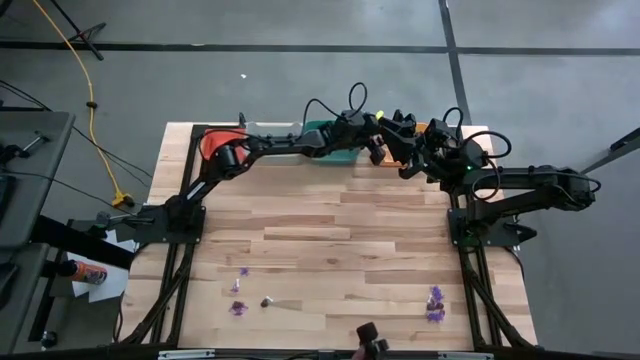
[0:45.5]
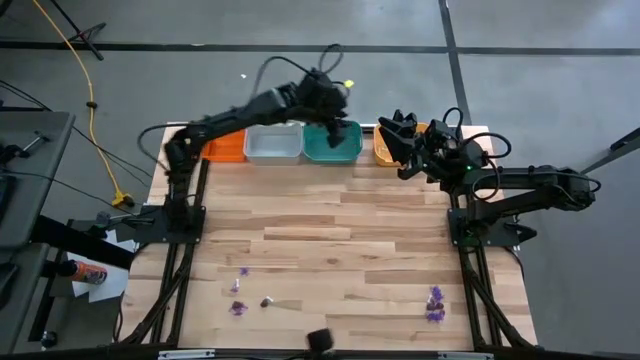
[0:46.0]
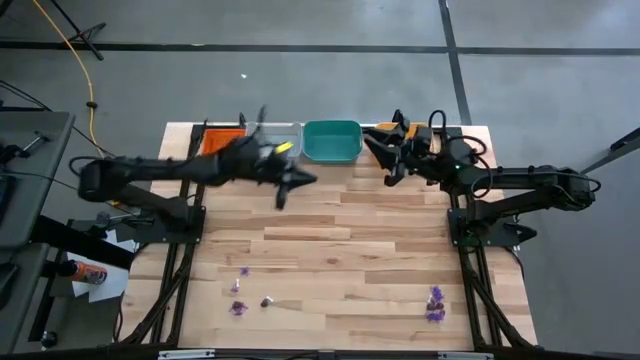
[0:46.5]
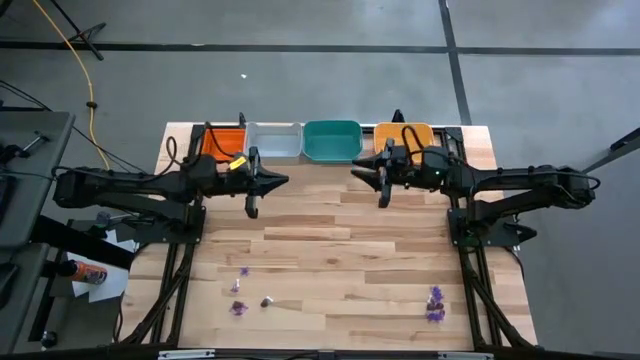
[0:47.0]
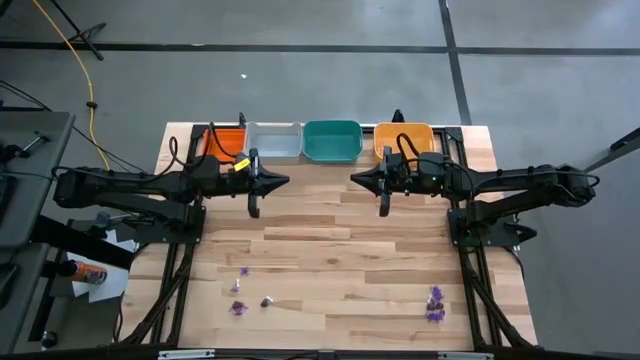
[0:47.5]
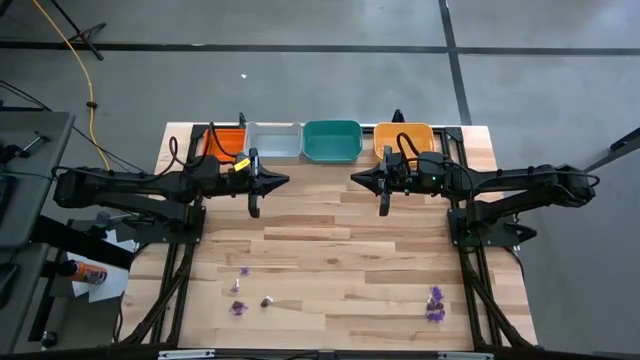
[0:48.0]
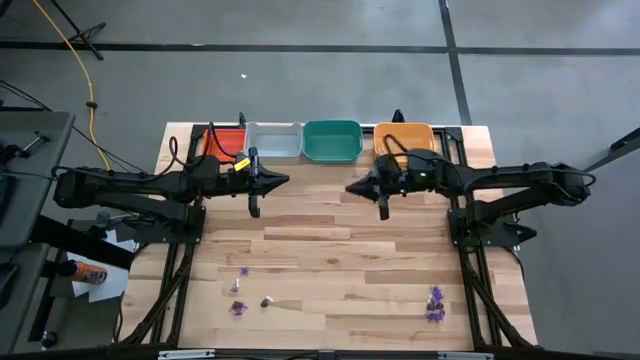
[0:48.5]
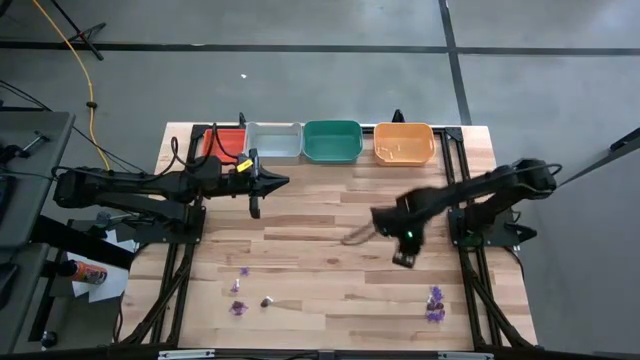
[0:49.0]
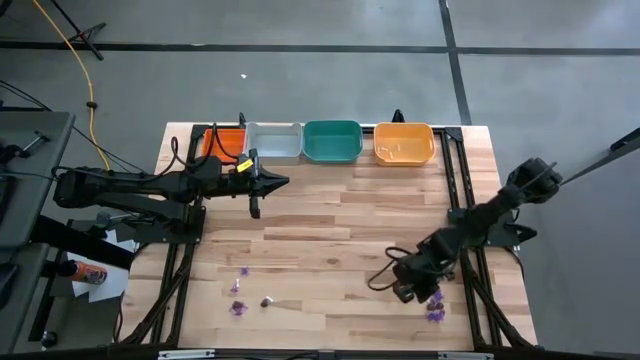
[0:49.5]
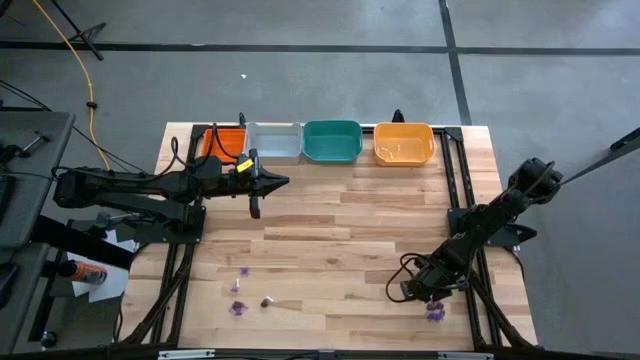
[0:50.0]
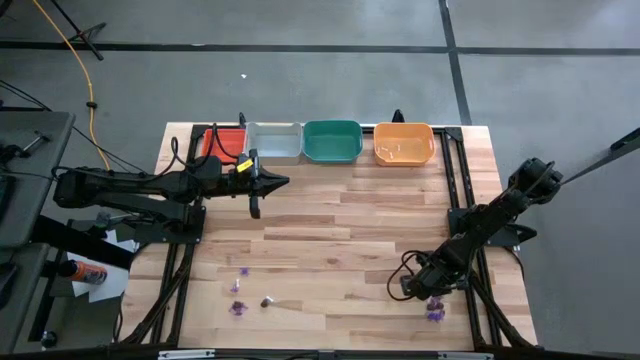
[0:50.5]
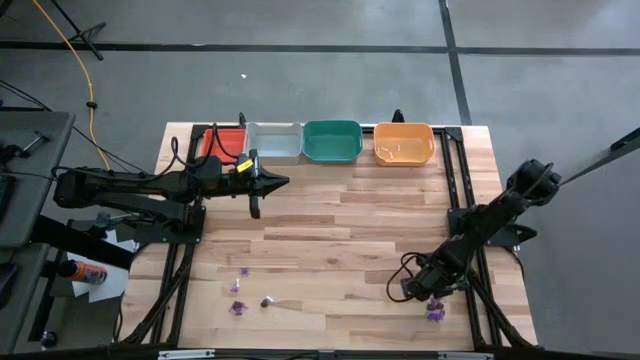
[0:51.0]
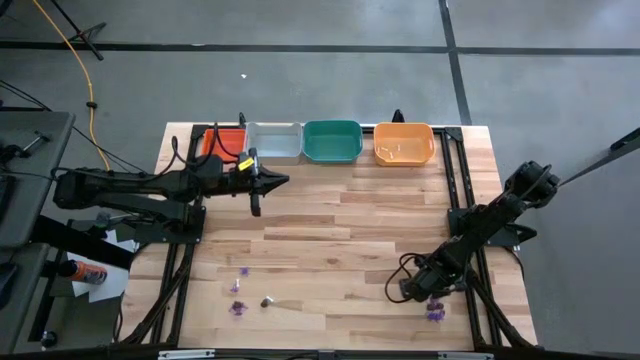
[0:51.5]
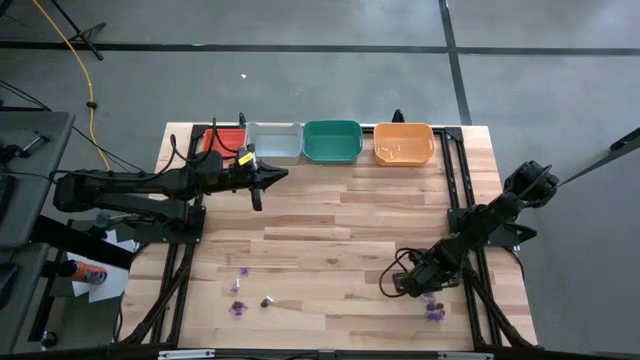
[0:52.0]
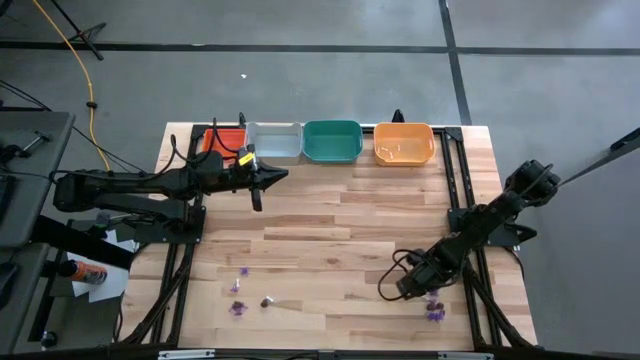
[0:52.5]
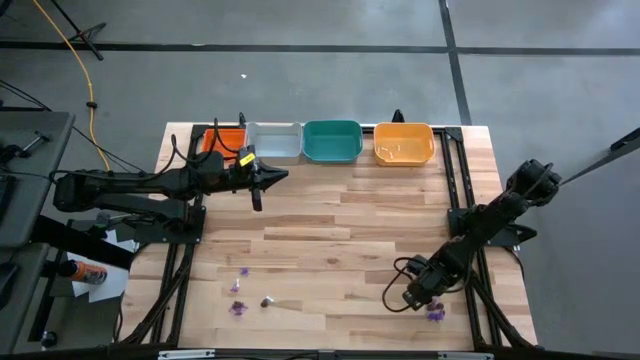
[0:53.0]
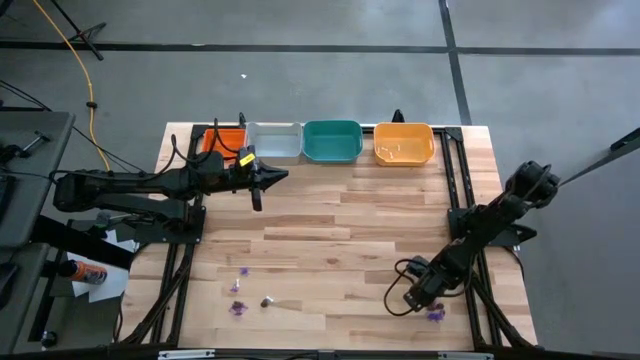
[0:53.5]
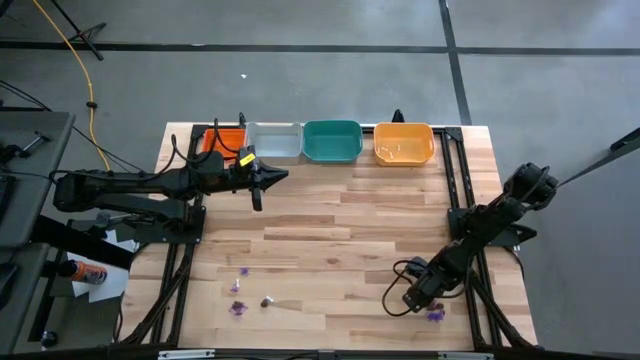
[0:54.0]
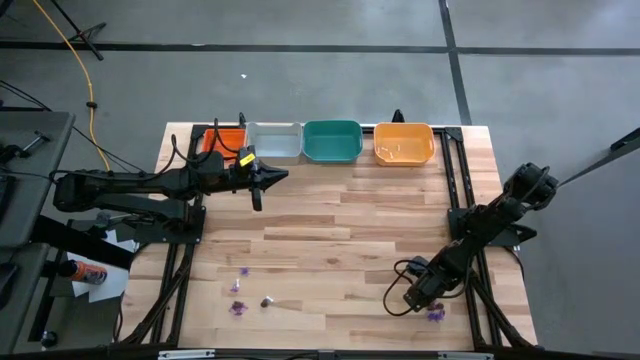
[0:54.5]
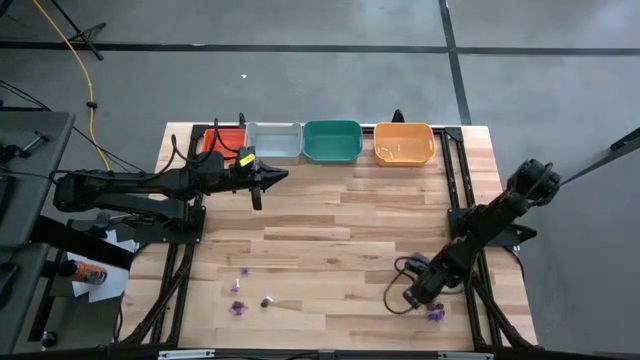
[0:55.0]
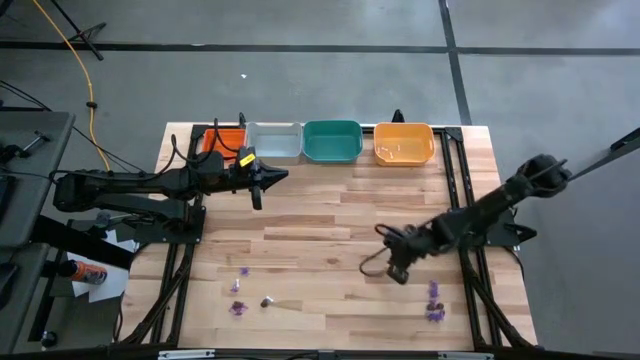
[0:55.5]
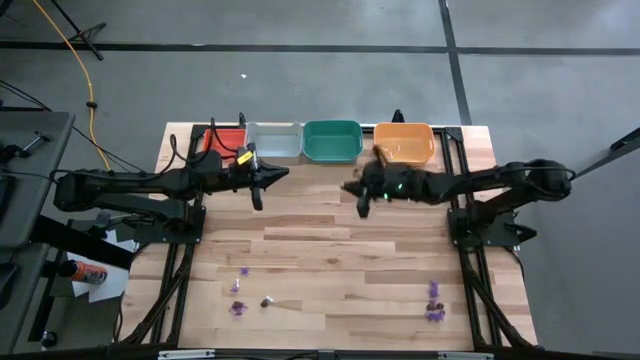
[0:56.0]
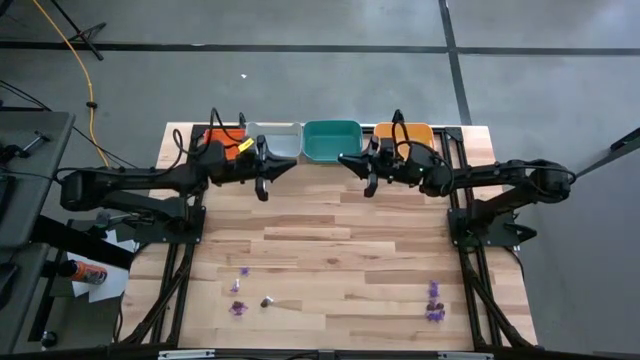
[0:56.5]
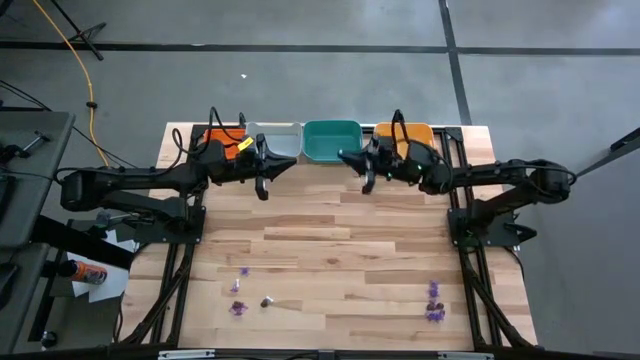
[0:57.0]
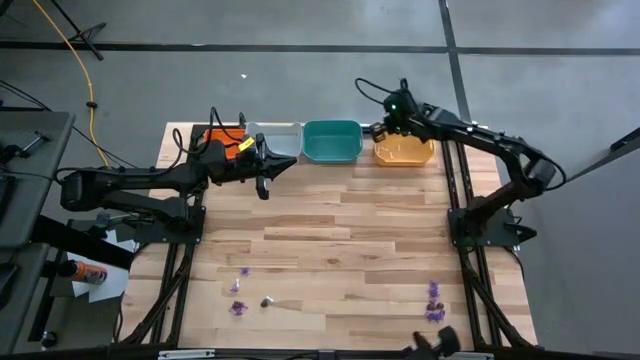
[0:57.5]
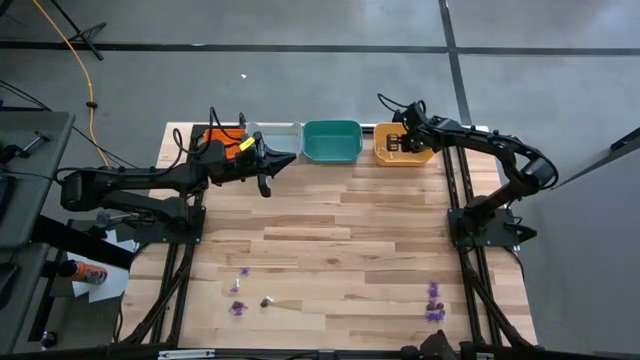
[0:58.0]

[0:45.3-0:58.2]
Task: Sort Halloween decoration
Put the white bone into the yellow bin

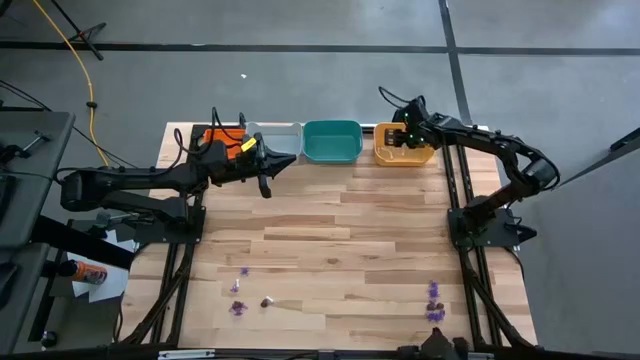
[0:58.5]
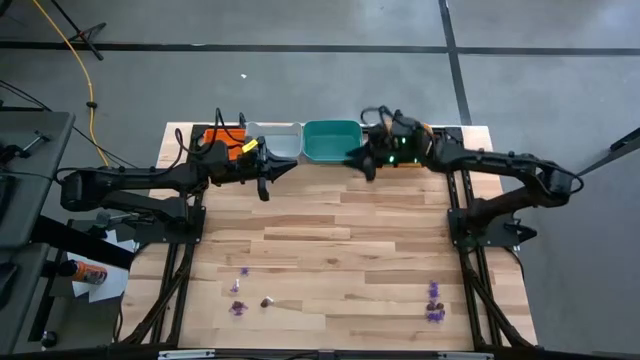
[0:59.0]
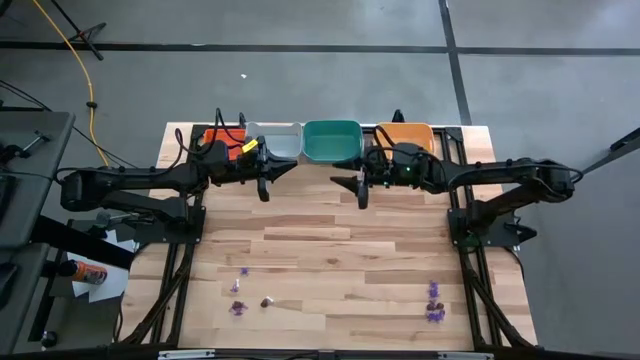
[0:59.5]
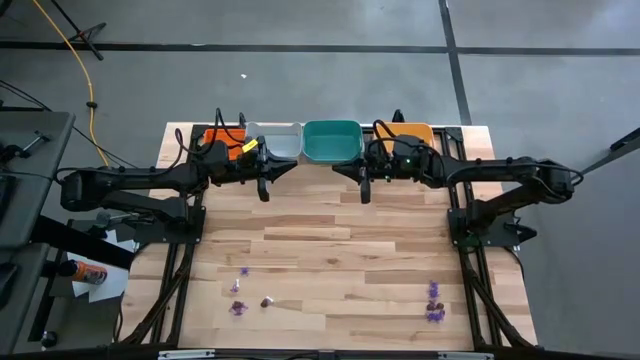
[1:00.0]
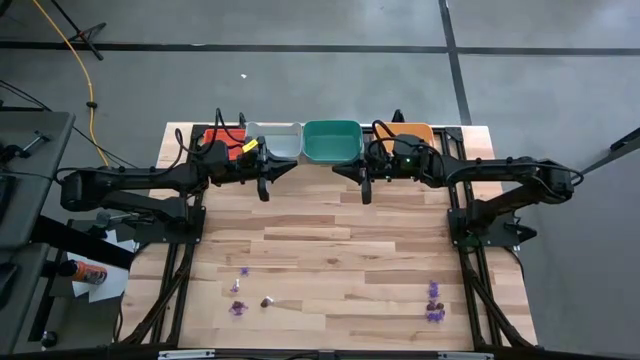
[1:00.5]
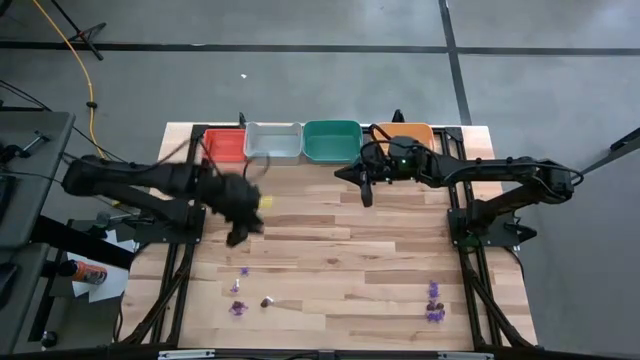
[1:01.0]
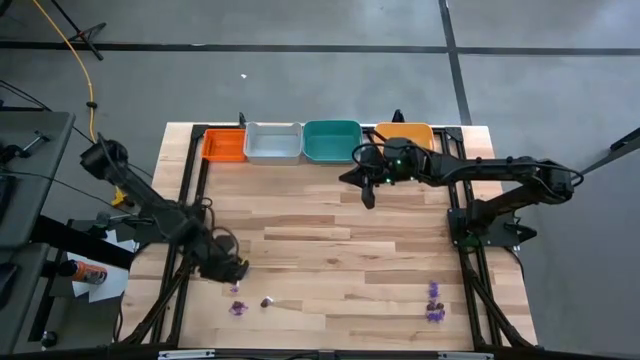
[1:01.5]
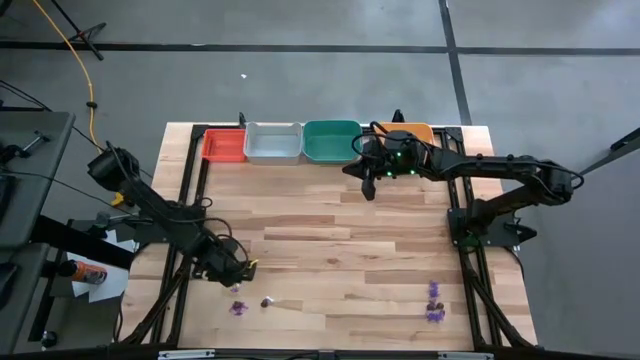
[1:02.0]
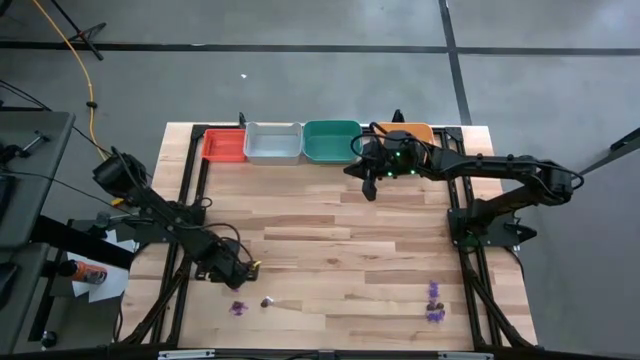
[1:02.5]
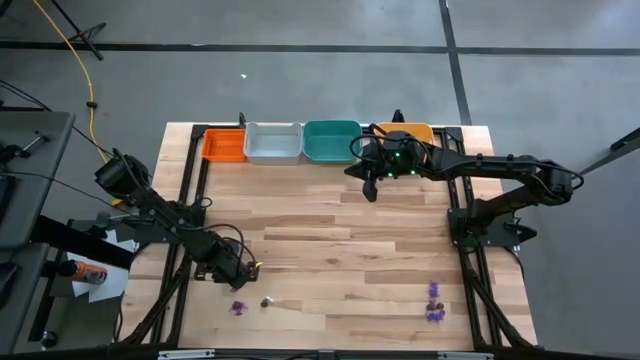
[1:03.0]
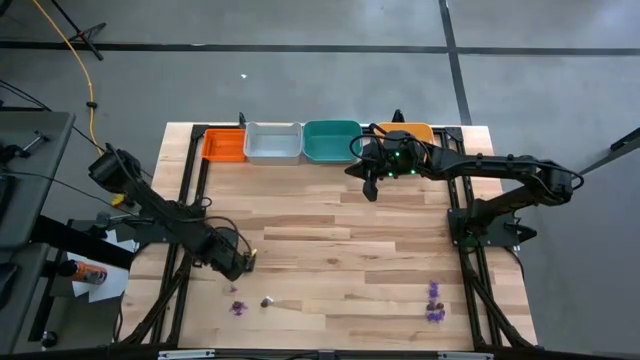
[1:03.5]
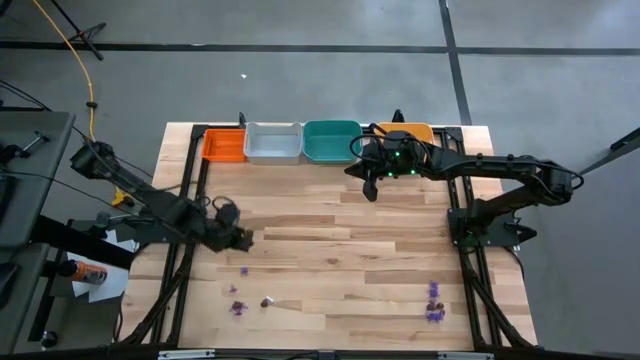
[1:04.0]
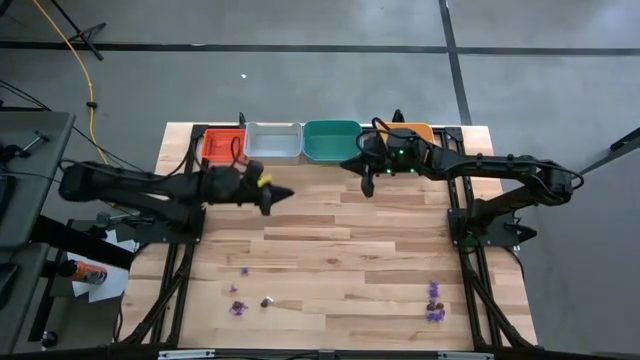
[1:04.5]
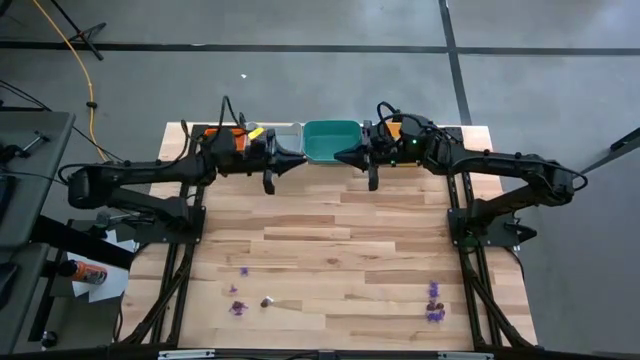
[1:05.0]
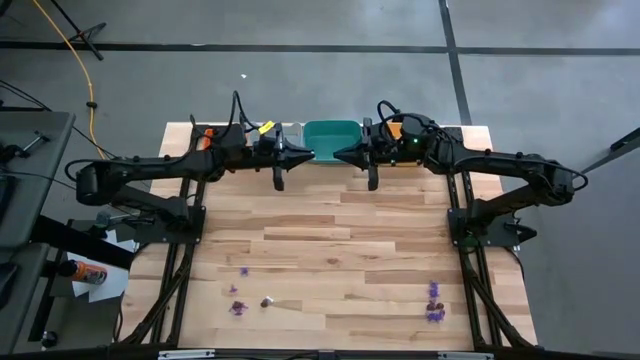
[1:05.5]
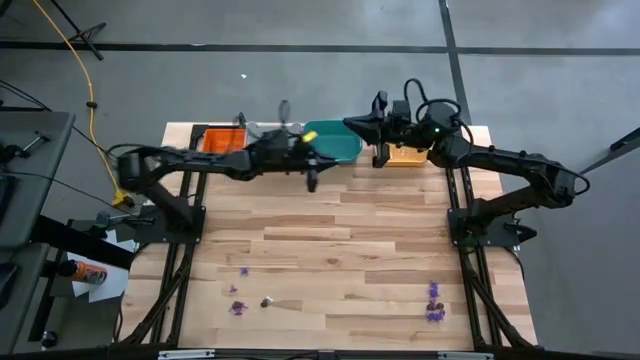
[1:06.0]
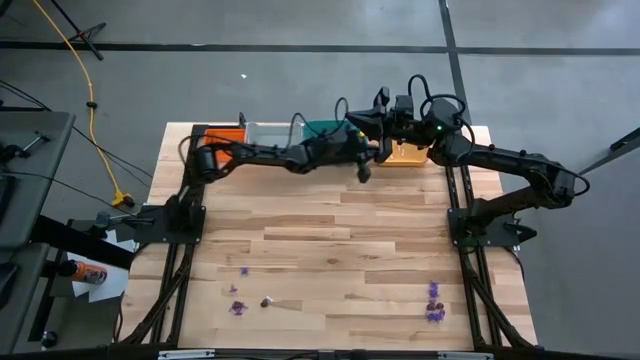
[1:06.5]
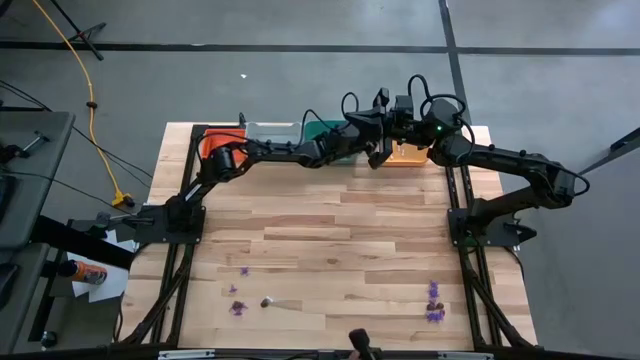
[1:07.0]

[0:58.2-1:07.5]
Put the white bone into the yellow bin
